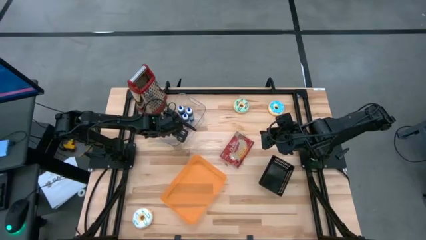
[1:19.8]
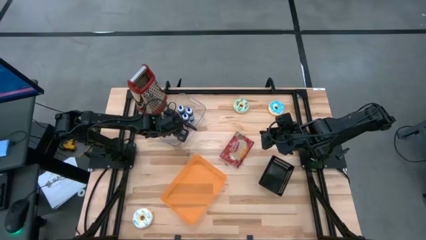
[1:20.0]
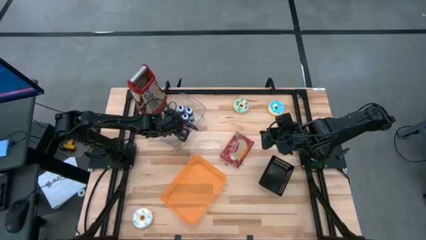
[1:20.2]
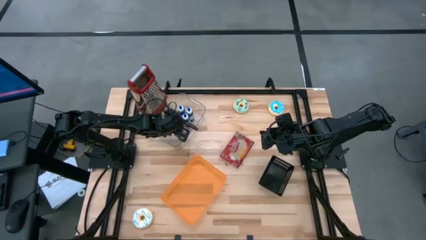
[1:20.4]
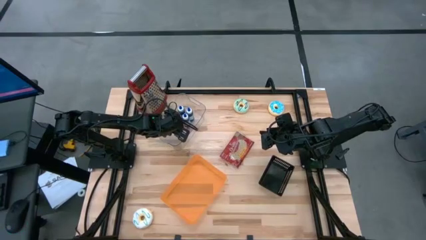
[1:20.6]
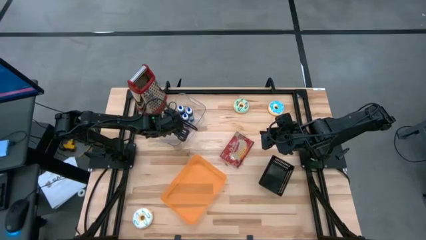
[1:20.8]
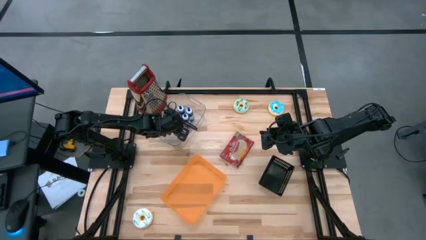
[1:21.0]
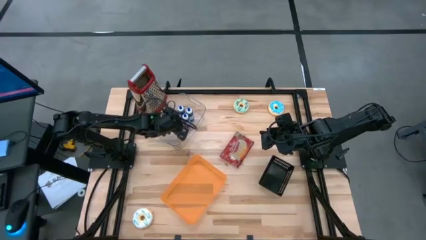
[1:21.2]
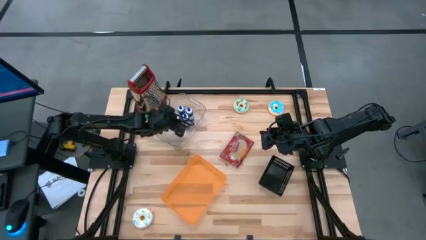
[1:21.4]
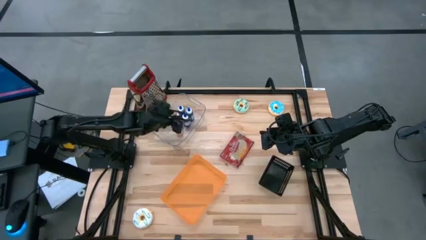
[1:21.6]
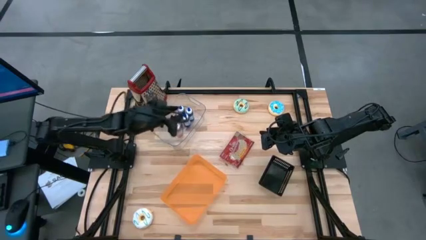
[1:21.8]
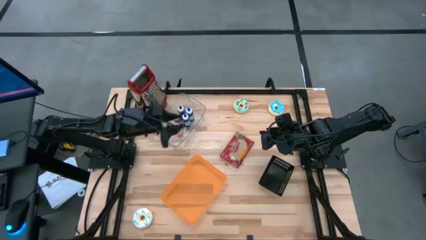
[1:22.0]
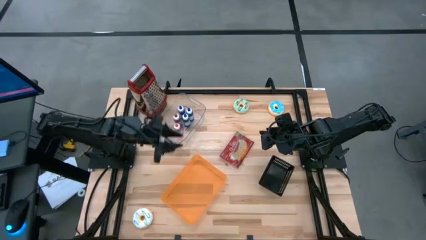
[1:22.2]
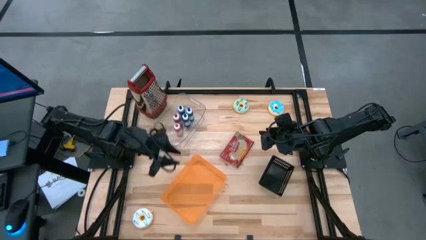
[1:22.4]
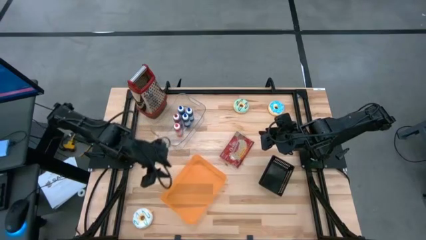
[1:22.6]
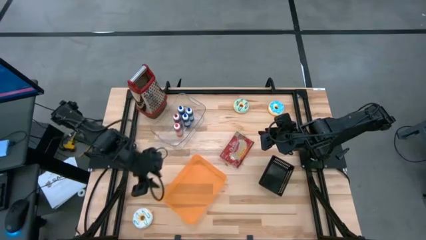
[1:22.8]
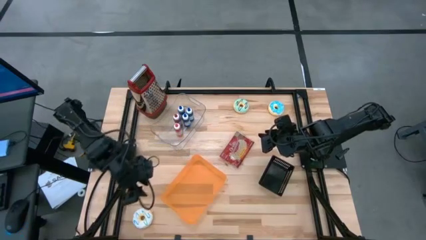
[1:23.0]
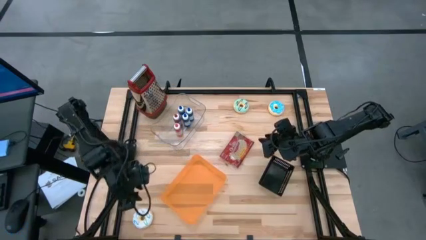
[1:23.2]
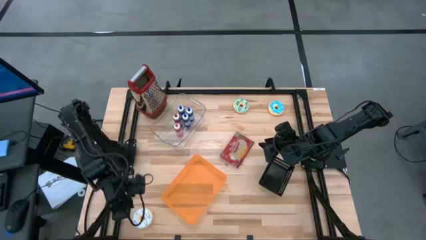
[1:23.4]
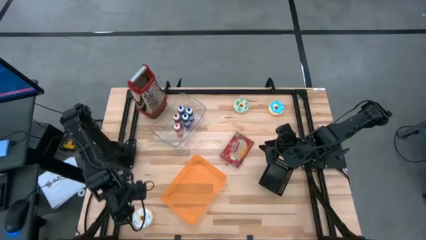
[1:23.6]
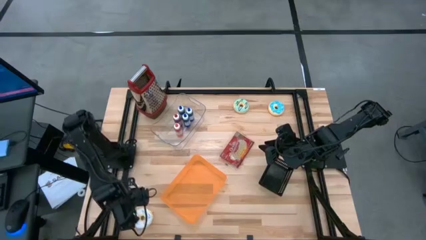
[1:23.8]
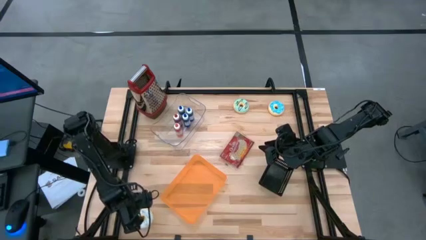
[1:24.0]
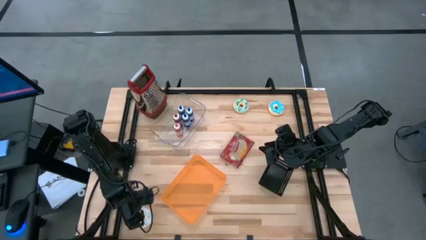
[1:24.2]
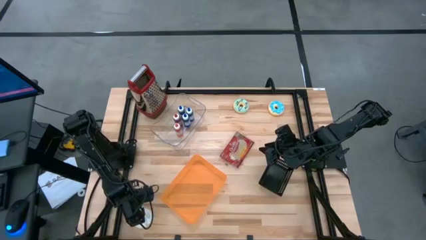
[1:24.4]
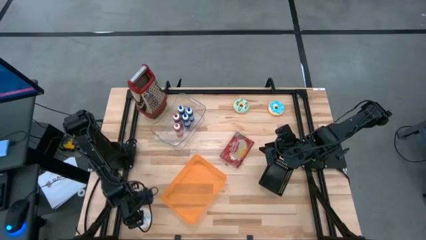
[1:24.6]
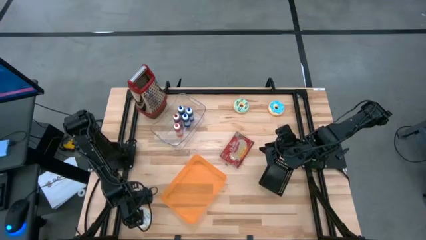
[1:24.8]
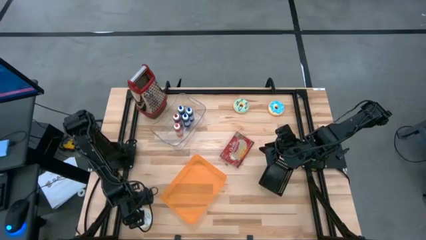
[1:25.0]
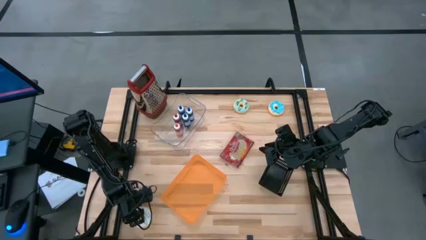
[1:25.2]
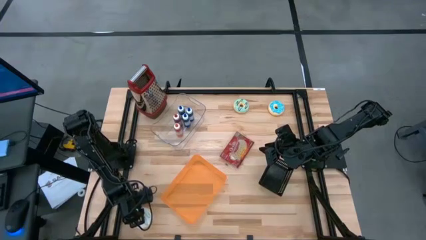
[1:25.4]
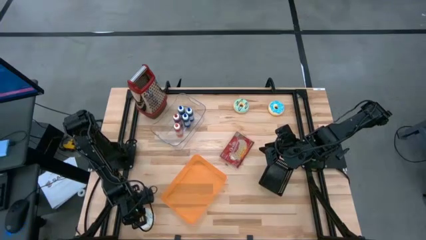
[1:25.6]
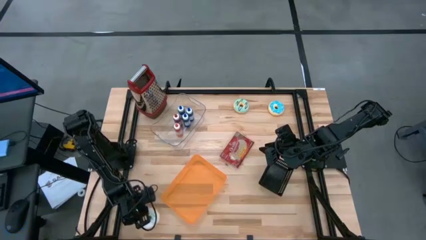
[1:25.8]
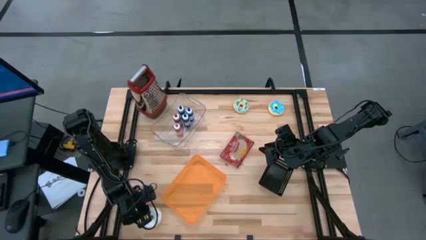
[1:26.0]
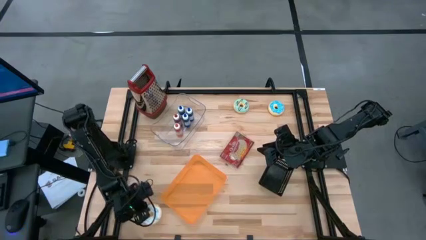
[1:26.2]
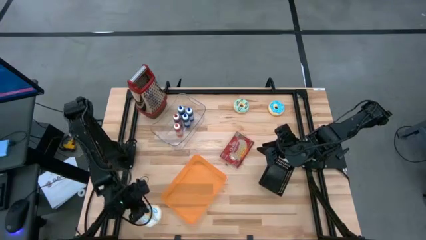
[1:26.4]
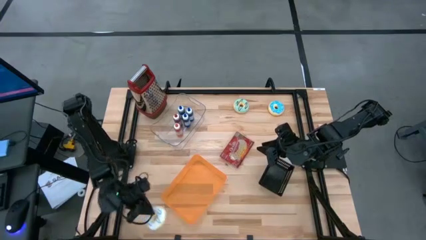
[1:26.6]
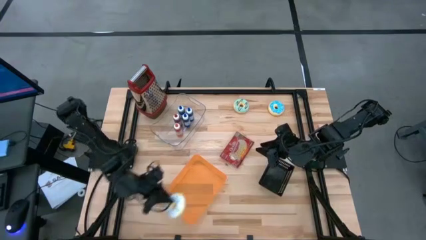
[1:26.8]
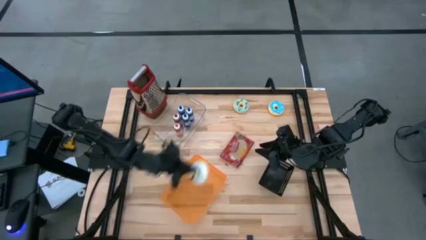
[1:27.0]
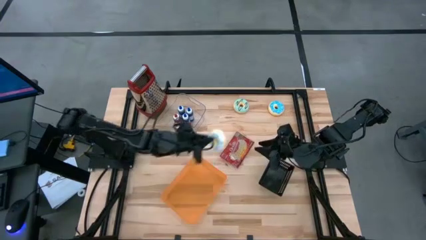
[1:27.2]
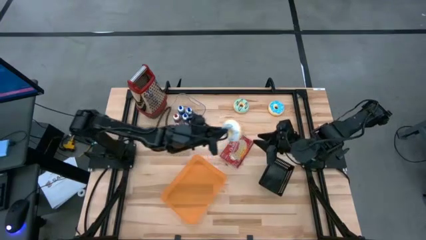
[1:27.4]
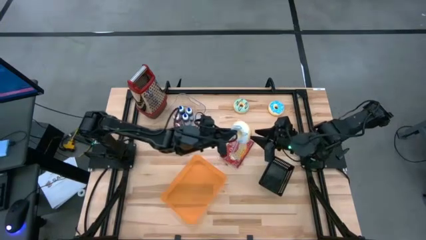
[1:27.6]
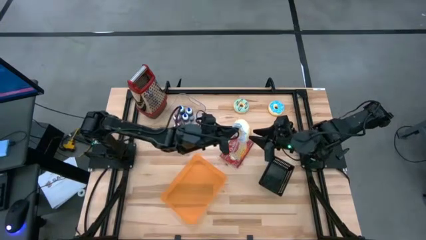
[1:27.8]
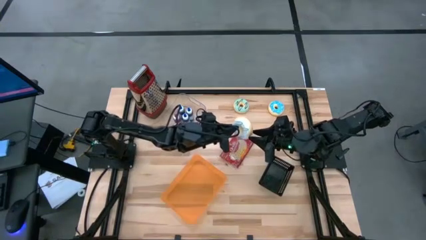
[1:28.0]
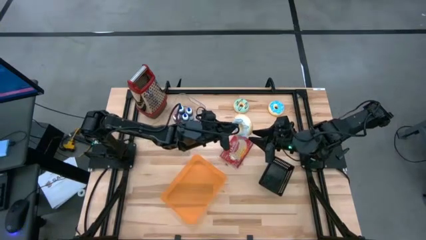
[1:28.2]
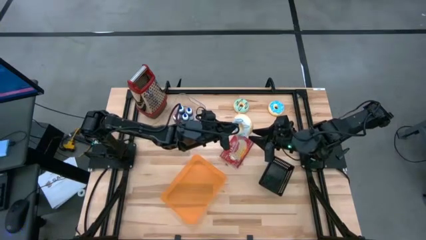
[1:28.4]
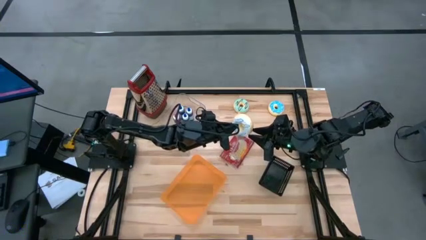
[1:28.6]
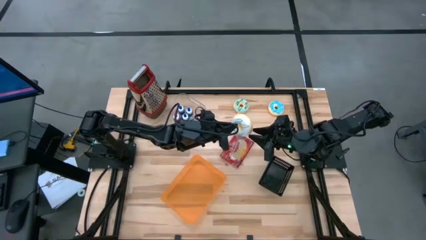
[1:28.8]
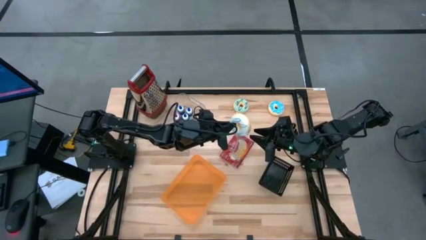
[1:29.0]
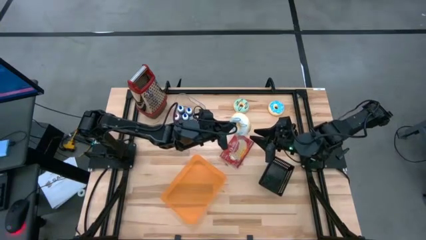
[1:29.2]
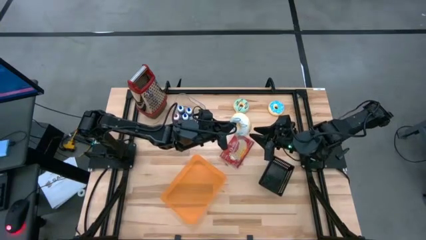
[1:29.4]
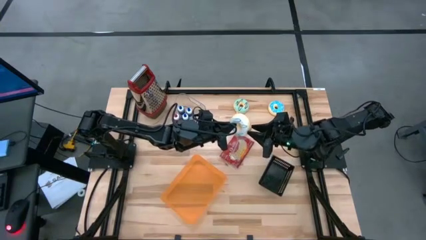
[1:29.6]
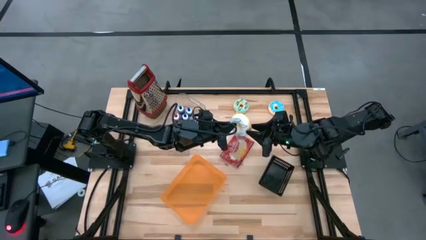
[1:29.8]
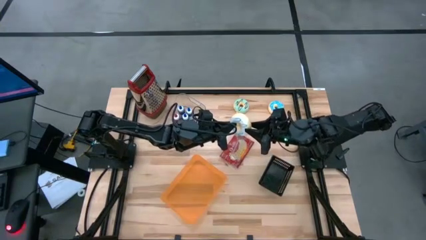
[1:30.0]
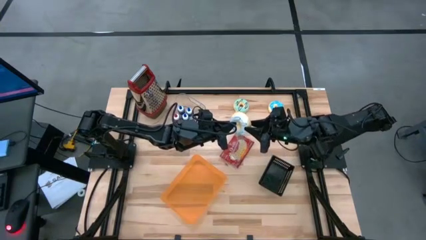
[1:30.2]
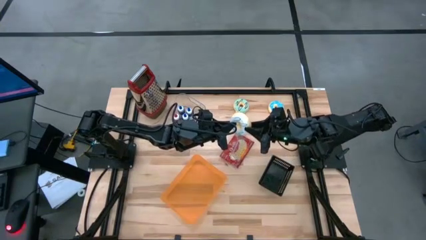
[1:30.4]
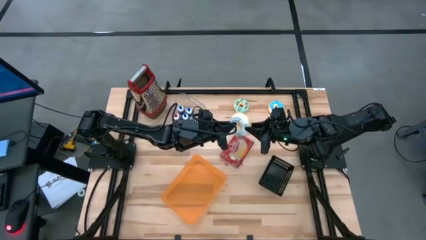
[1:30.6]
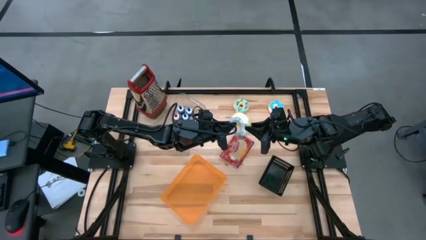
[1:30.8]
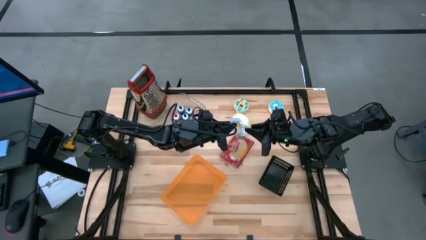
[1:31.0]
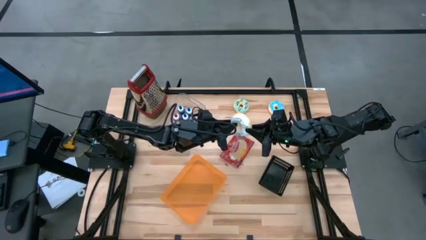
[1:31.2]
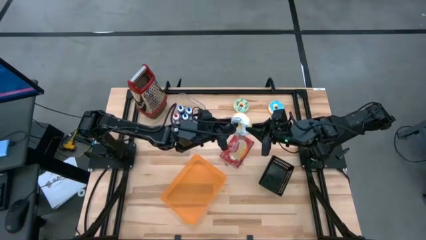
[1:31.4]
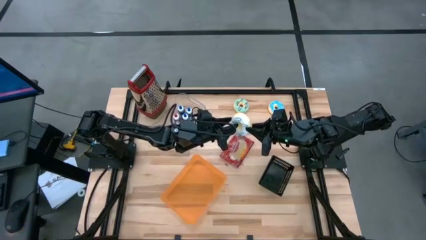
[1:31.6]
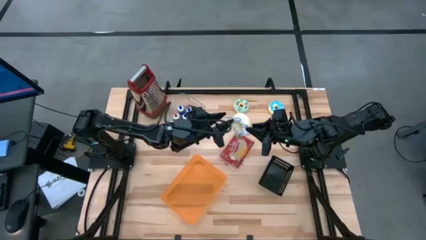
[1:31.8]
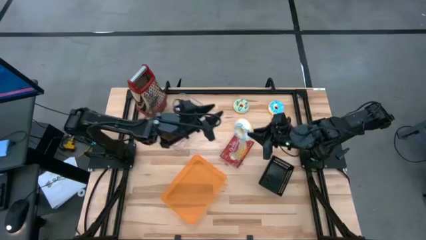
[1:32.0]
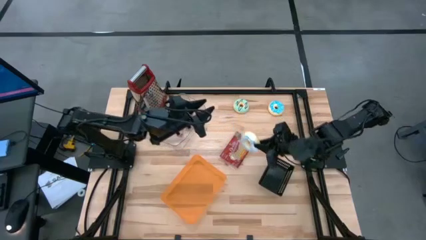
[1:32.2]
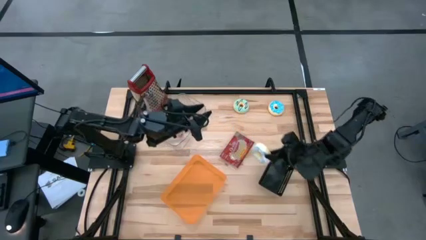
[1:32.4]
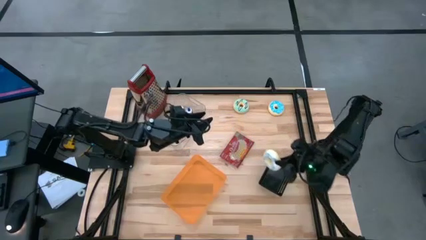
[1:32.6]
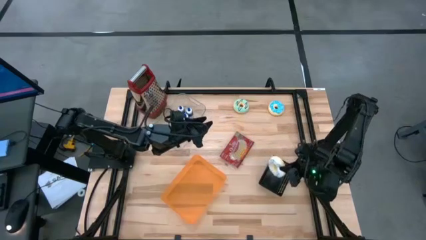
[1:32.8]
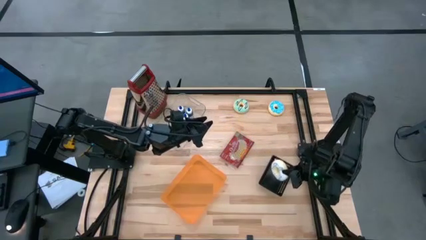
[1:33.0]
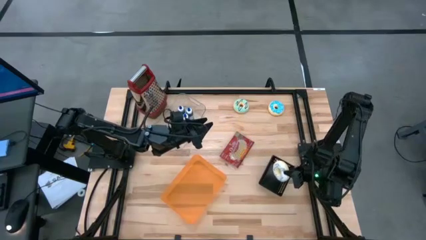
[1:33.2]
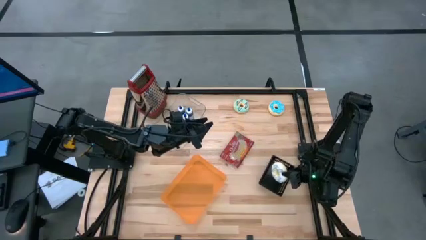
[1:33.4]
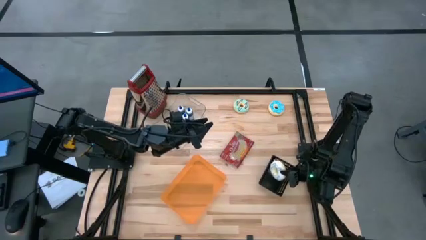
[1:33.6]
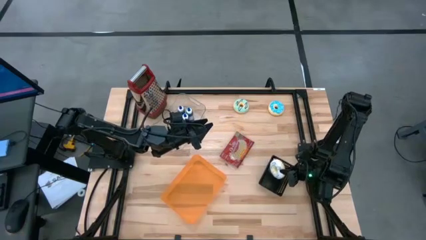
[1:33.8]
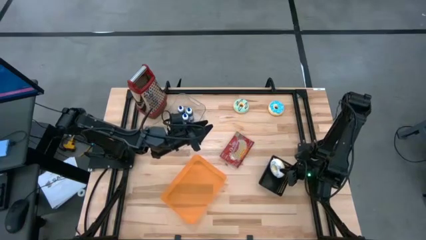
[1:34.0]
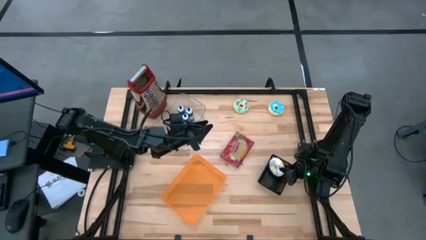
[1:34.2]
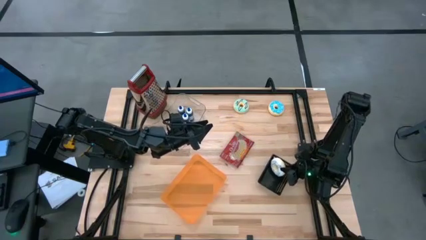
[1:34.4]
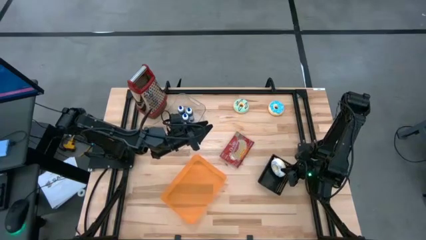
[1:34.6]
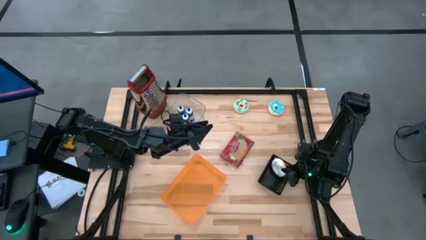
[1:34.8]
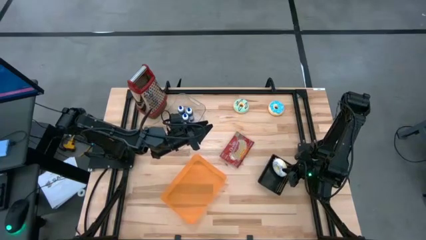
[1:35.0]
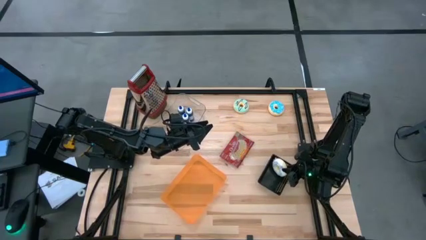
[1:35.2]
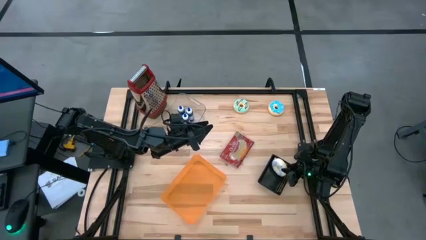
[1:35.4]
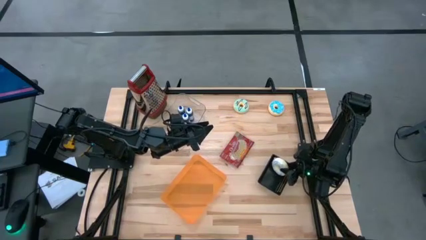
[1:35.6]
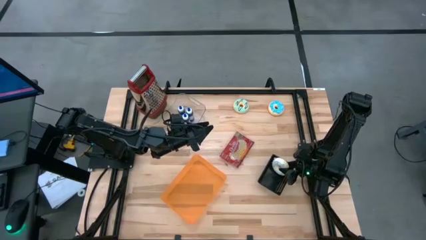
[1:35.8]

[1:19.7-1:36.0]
Put the white donut into the black basket
